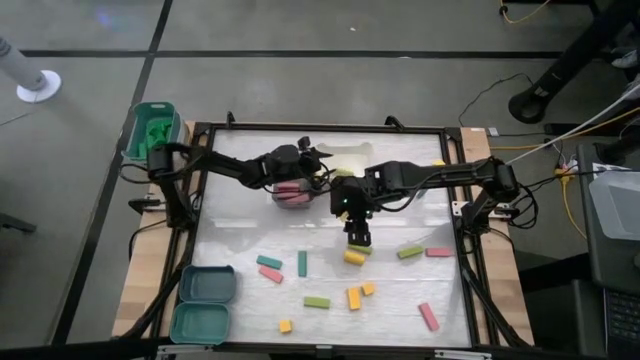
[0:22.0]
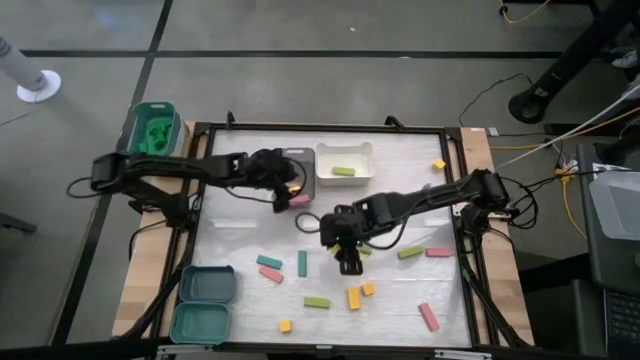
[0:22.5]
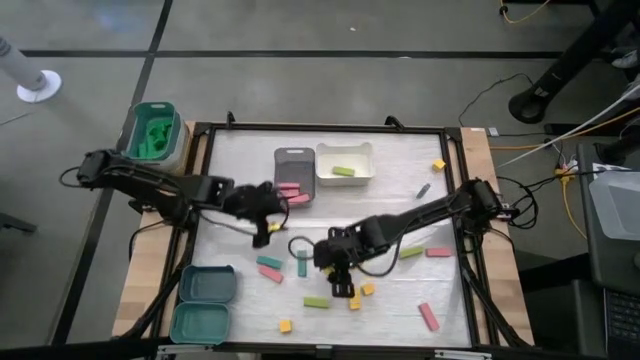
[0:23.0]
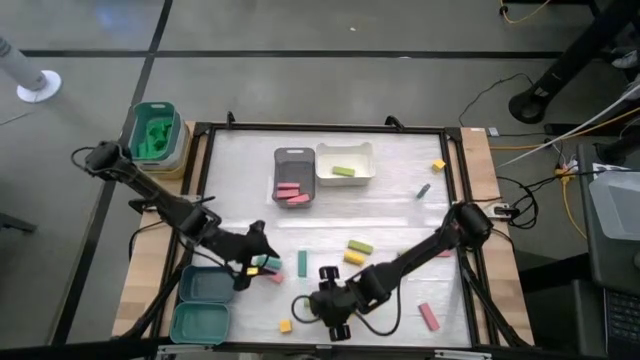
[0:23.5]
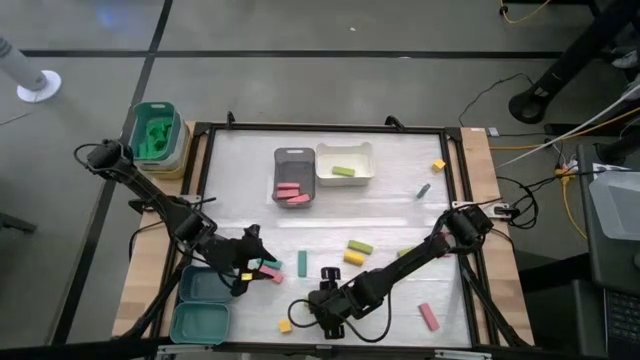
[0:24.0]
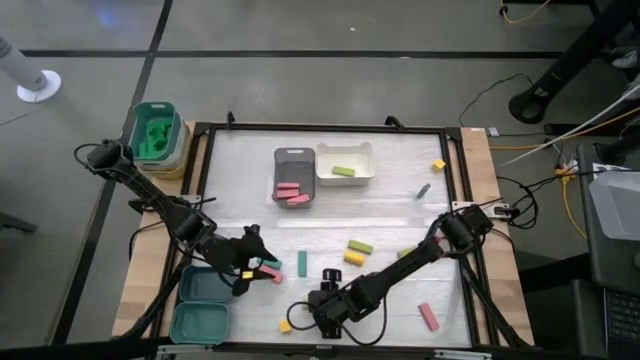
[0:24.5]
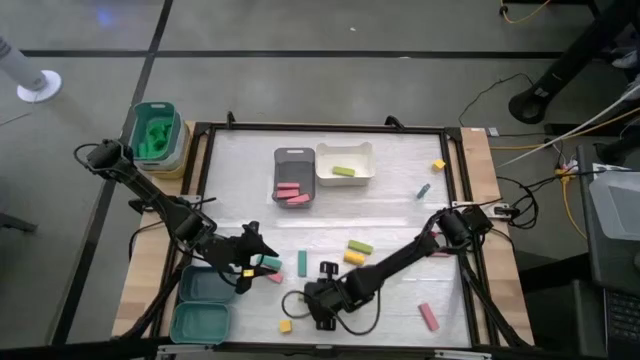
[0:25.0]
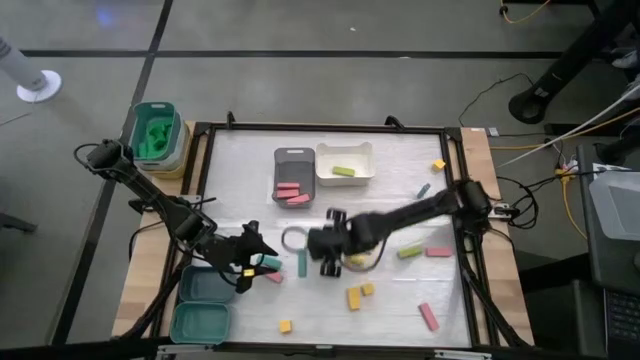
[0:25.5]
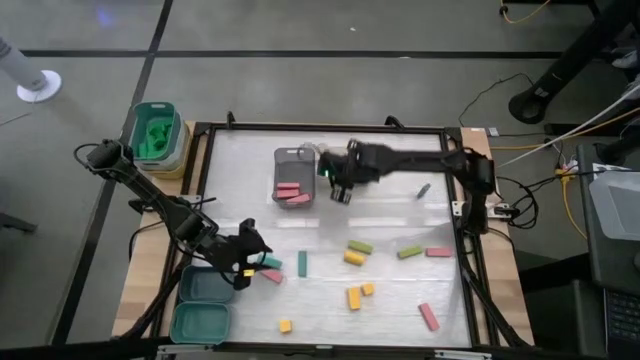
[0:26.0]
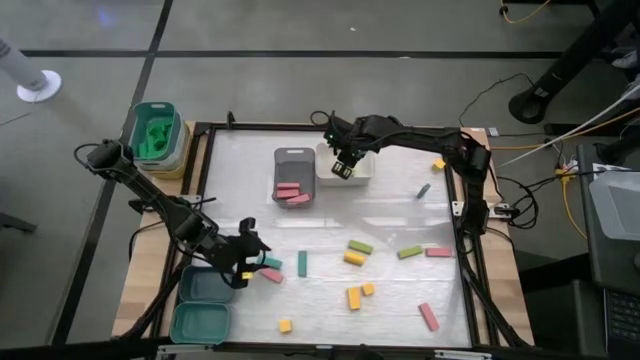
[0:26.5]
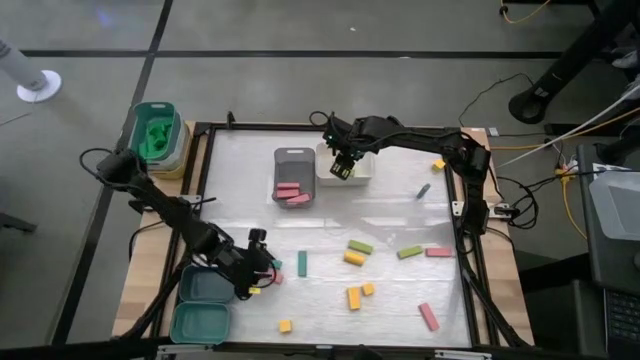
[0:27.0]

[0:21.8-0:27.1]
Task: Sort blocks
Put the green block into the white bin

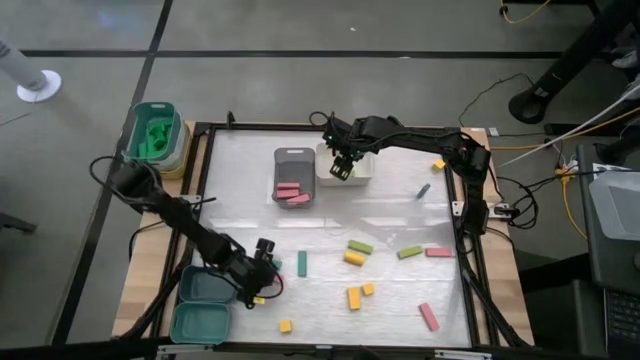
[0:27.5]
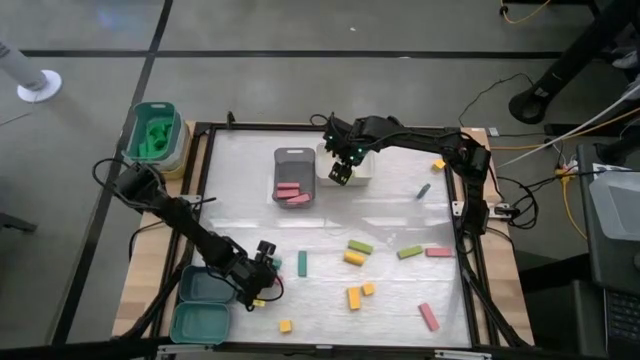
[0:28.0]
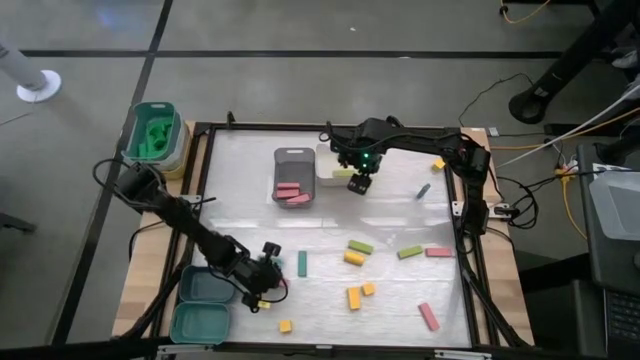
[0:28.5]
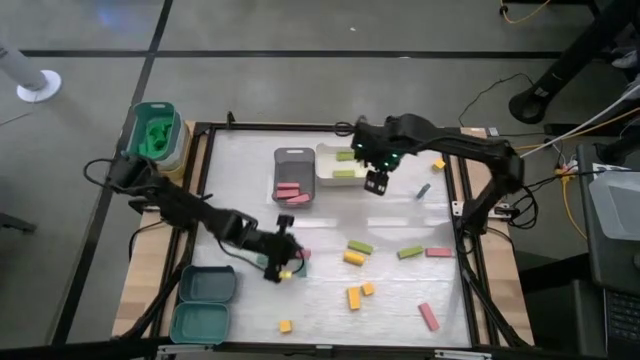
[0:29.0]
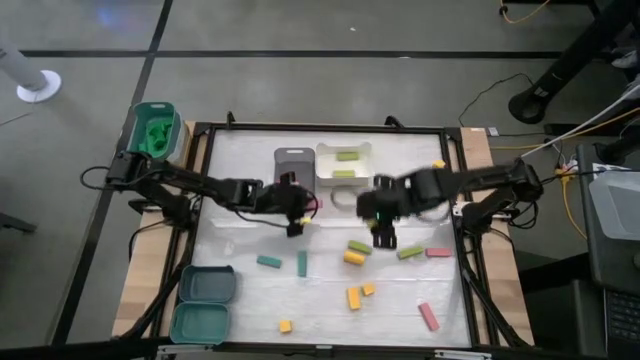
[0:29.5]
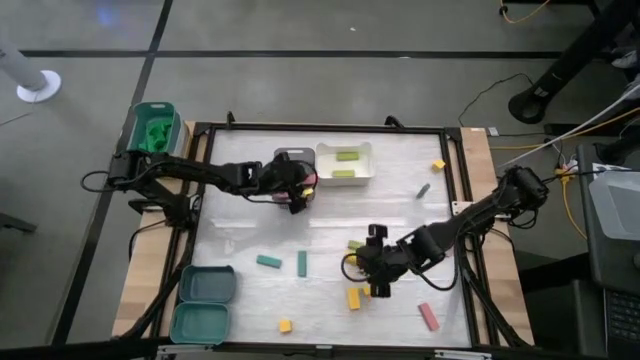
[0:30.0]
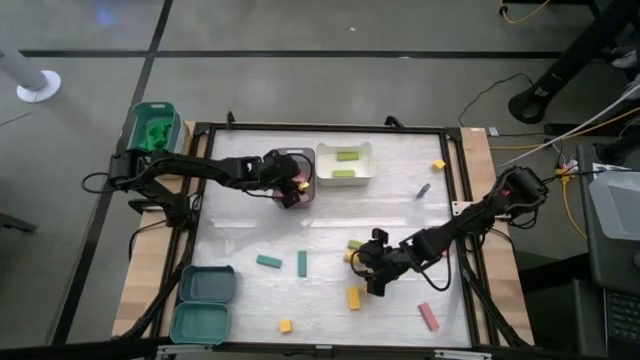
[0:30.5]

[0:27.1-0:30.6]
Put the pink block into the black bin

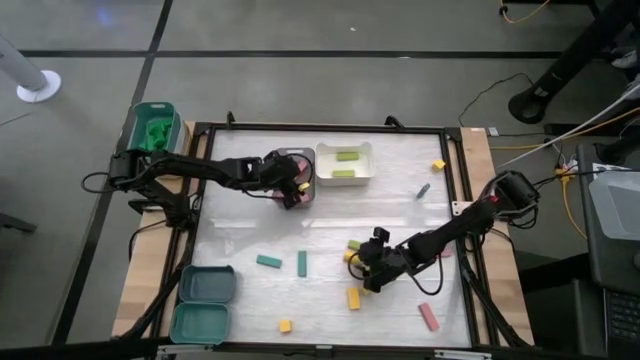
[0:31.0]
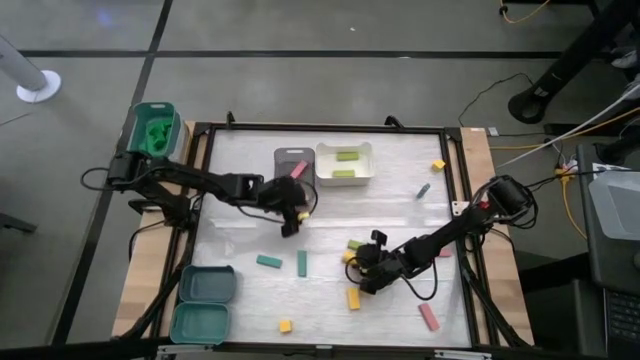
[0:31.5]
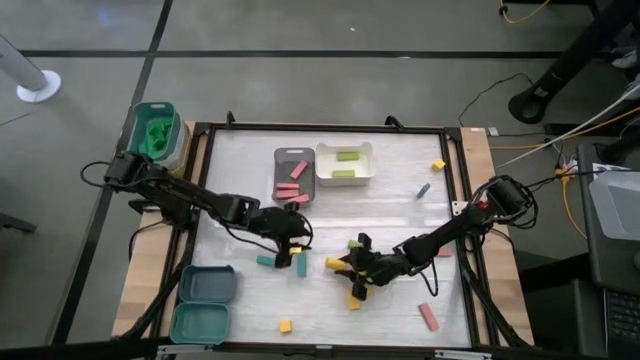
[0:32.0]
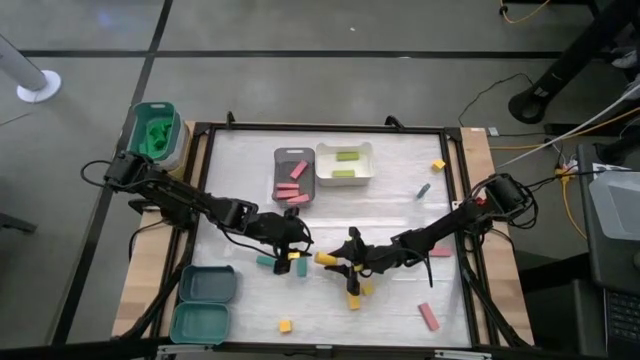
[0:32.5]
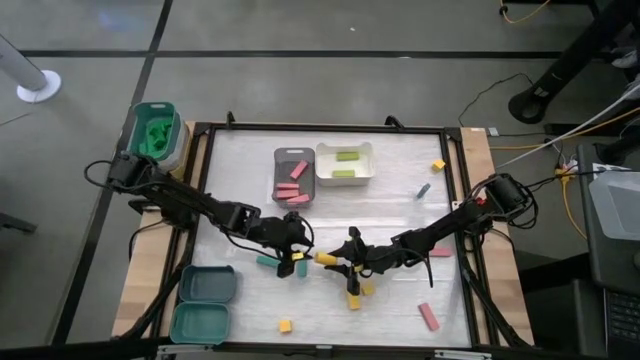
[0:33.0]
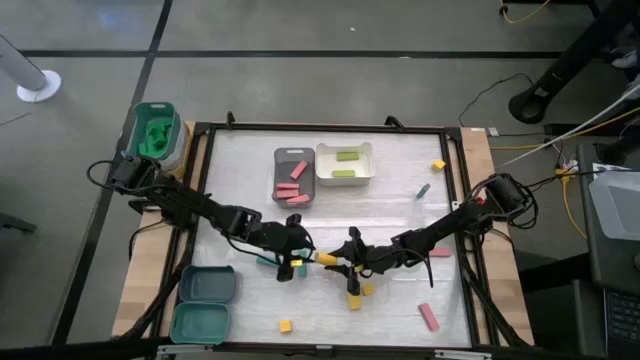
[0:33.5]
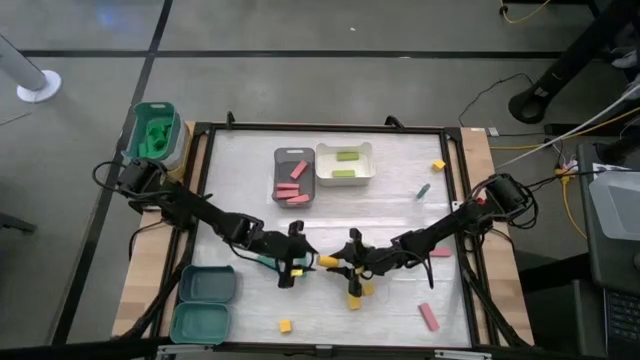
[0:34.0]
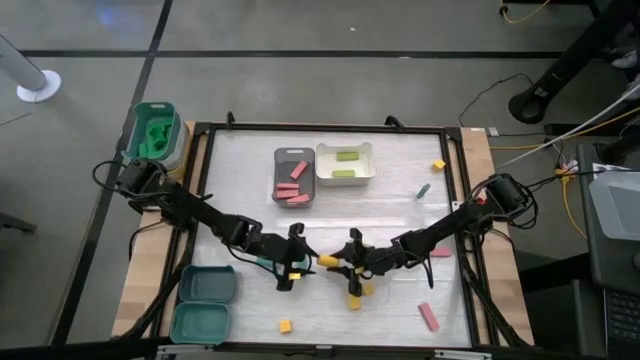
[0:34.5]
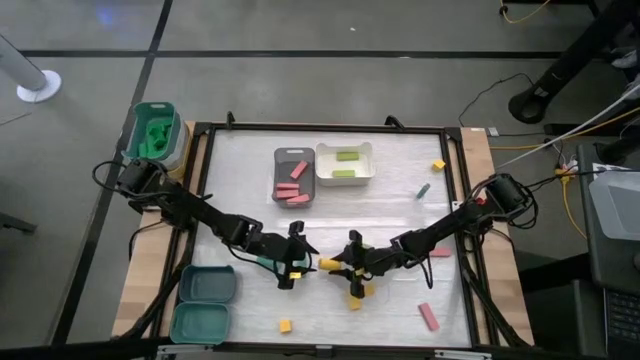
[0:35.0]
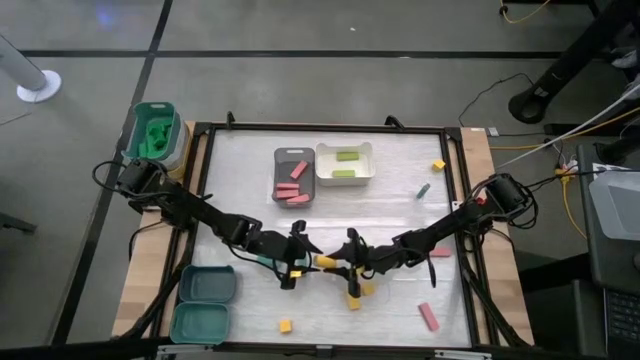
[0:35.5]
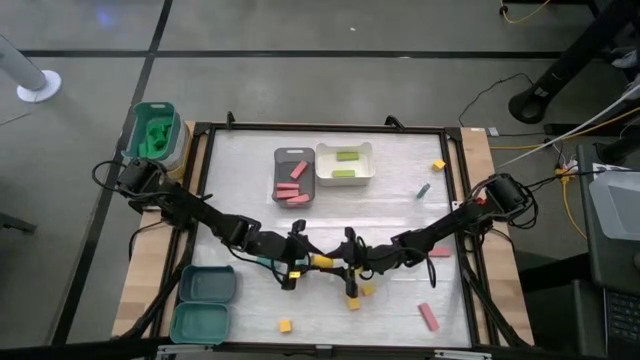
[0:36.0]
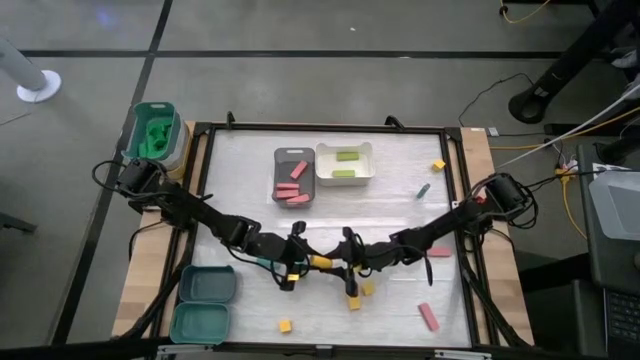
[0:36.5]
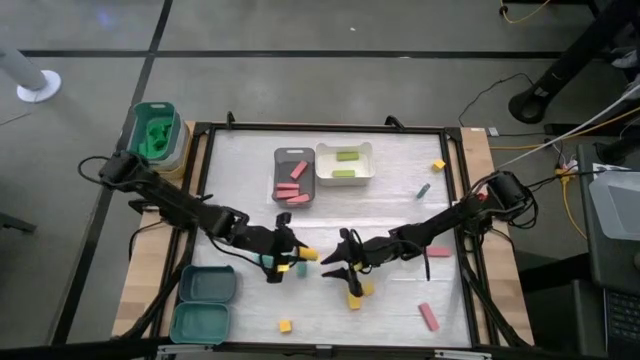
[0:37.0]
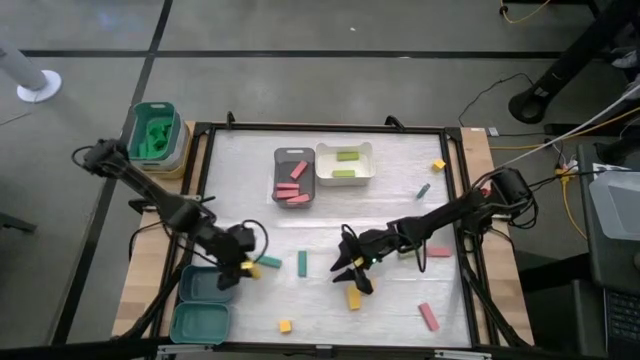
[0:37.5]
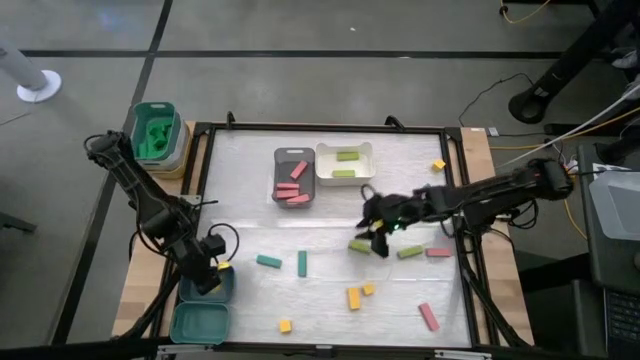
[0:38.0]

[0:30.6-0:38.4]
Put the yellow block into the blue bin

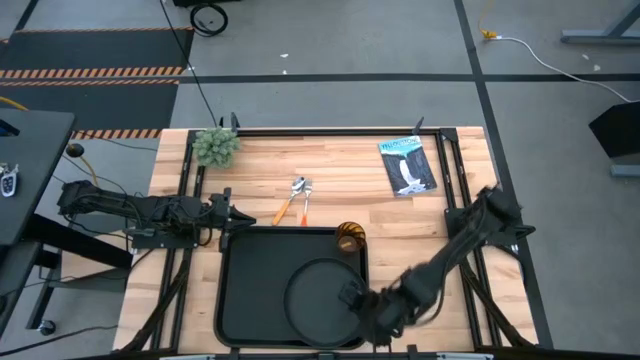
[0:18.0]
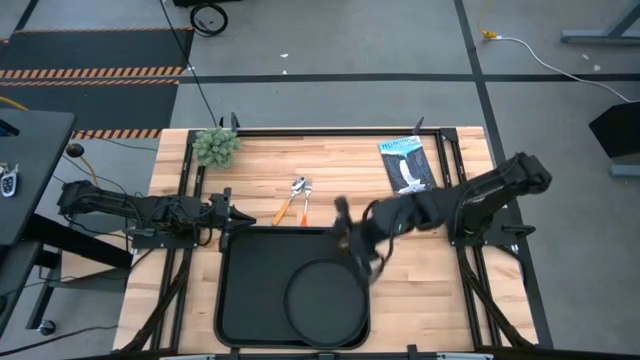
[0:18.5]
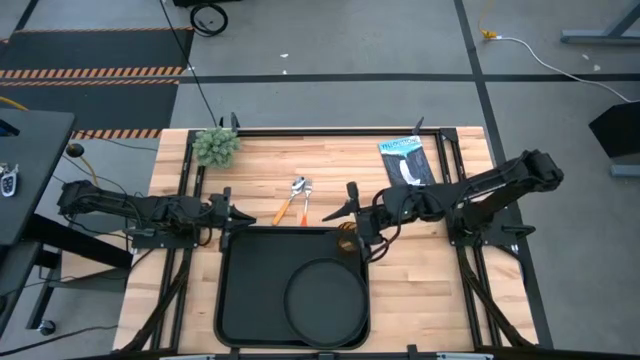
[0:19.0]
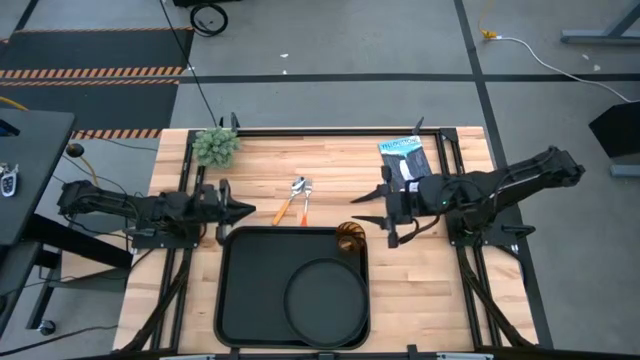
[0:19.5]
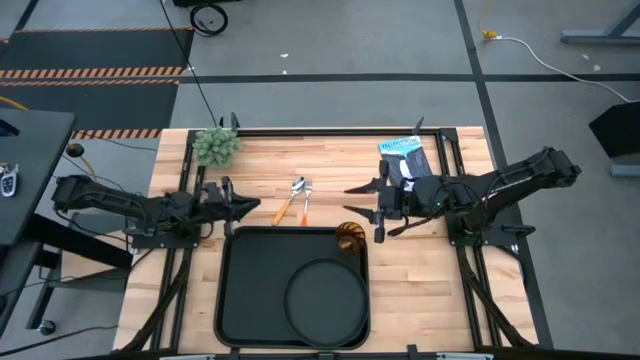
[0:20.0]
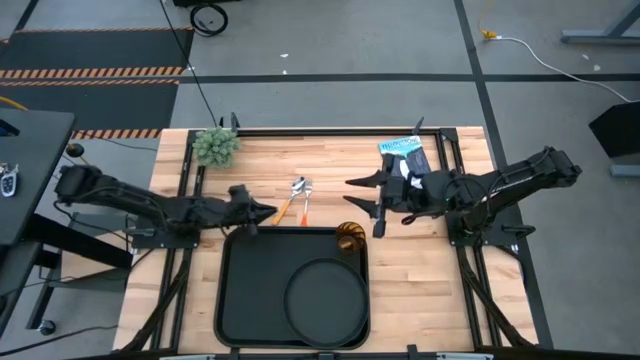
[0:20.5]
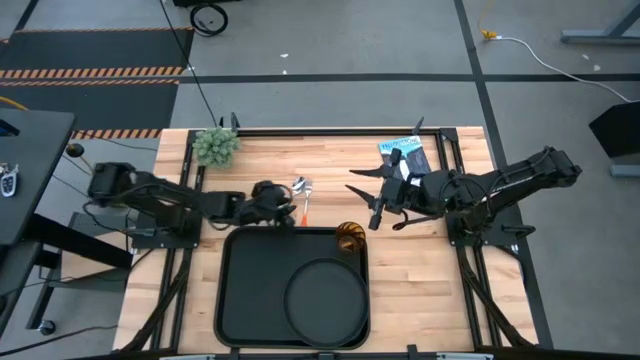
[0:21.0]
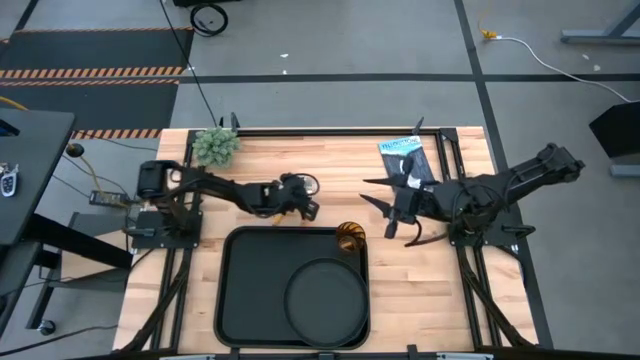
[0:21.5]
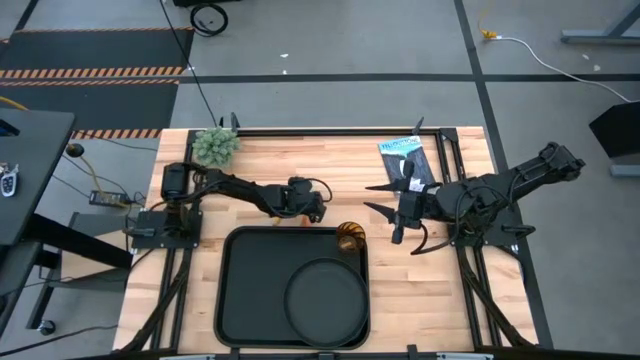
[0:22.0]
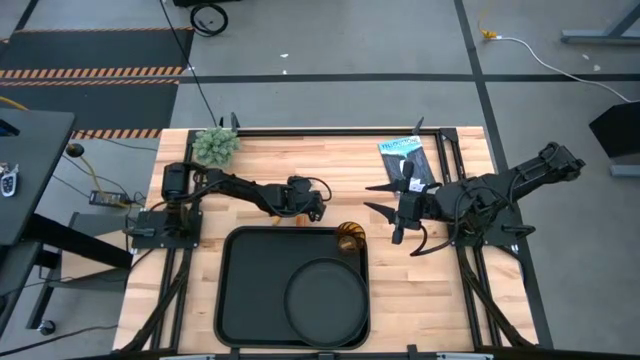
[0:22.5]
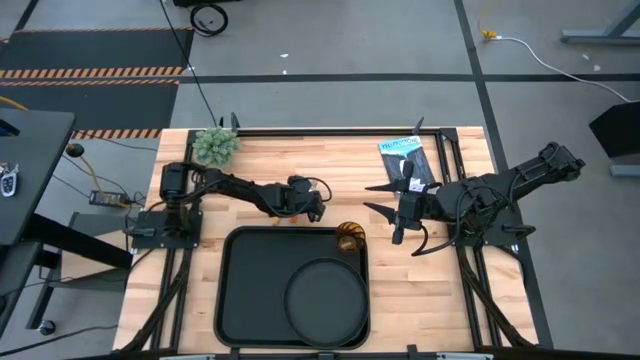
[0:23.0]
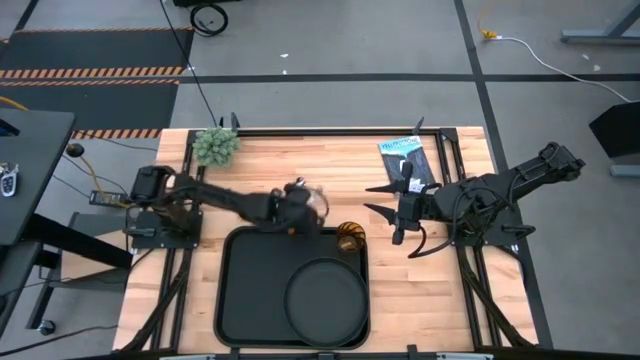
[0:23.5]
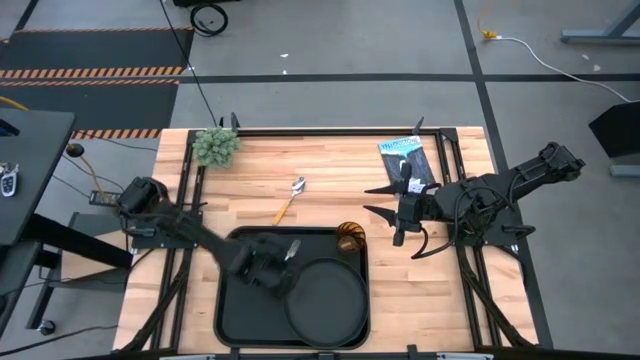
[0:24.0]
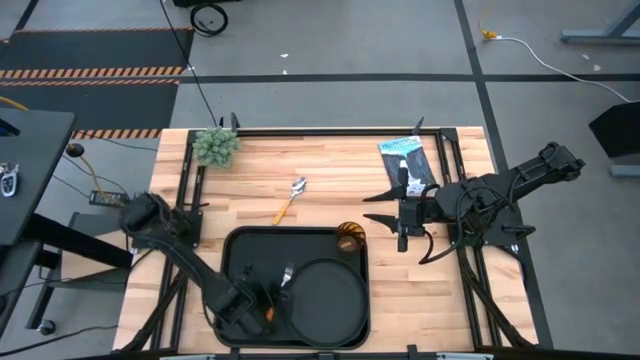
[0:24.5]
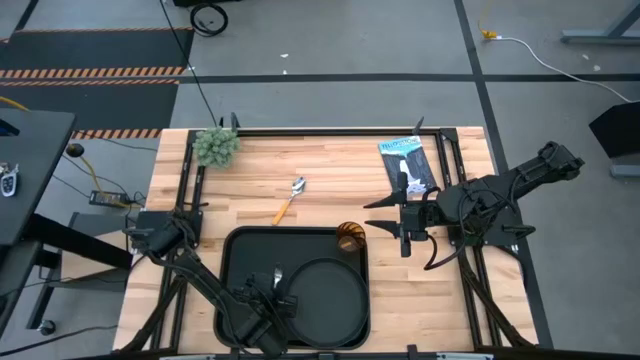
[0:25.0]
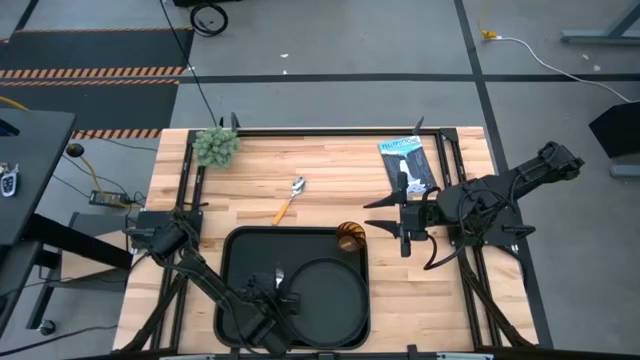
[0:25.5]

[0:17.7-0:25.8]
Task: Pick and place plate/cup/fork/spoon on tray
Put the orange fork on the black tray beside the black plate
